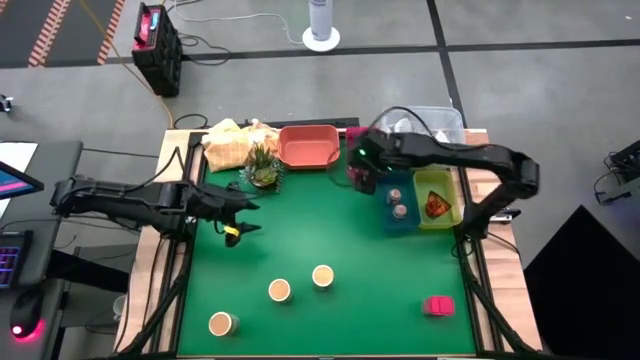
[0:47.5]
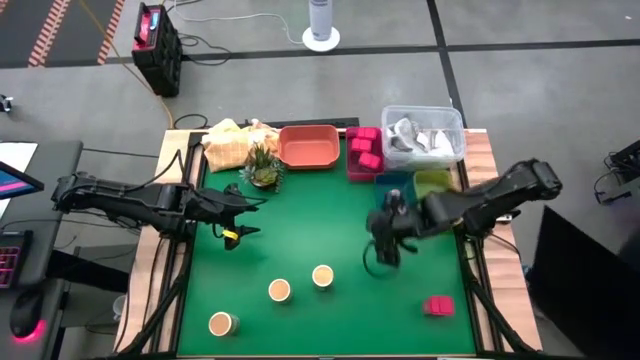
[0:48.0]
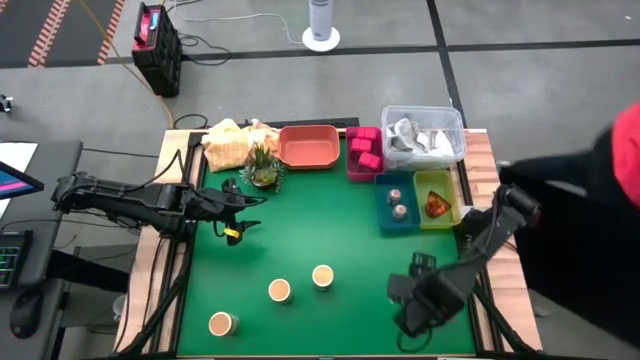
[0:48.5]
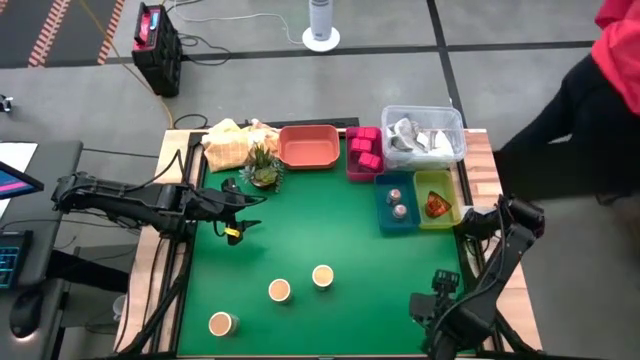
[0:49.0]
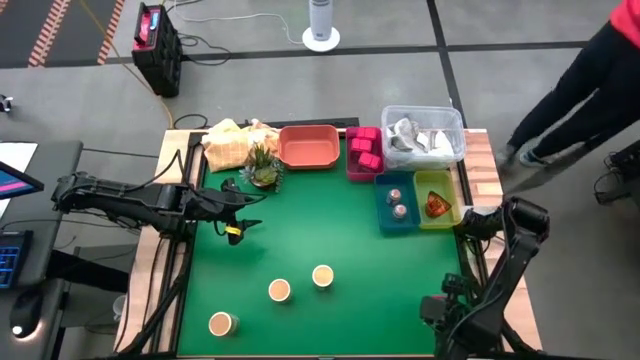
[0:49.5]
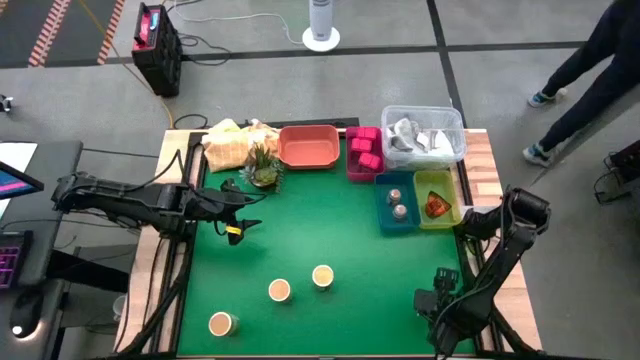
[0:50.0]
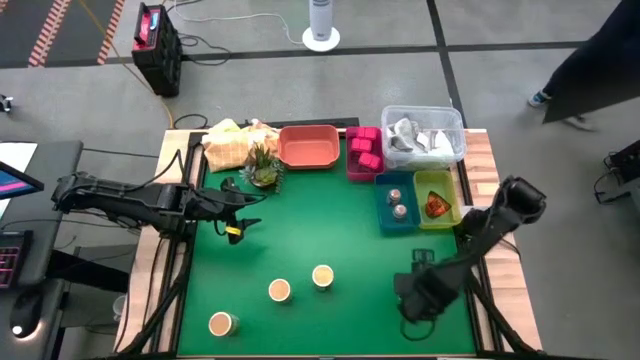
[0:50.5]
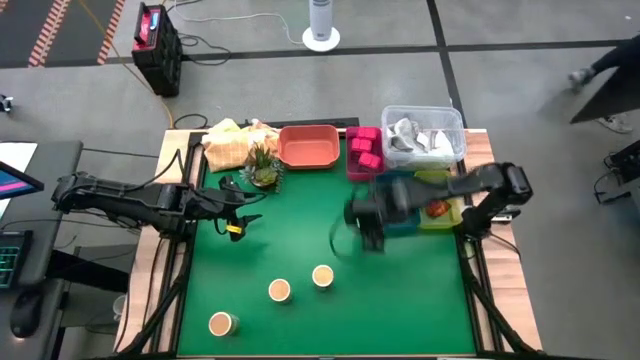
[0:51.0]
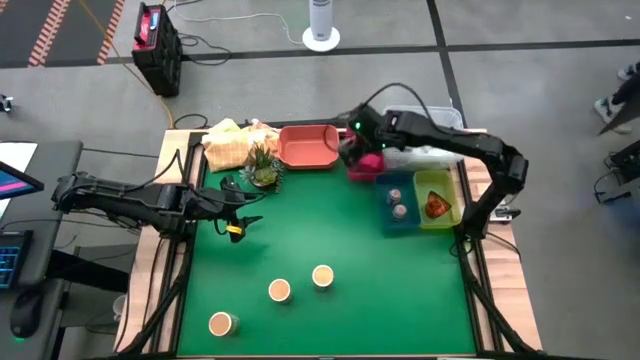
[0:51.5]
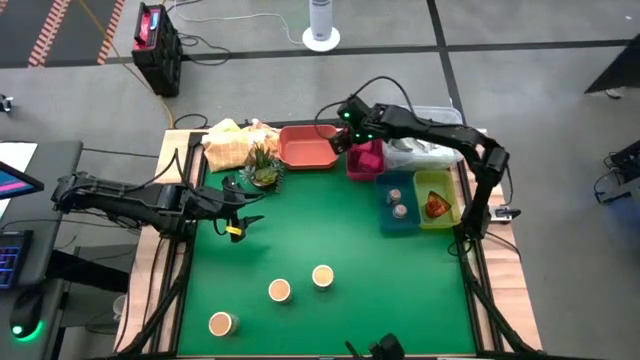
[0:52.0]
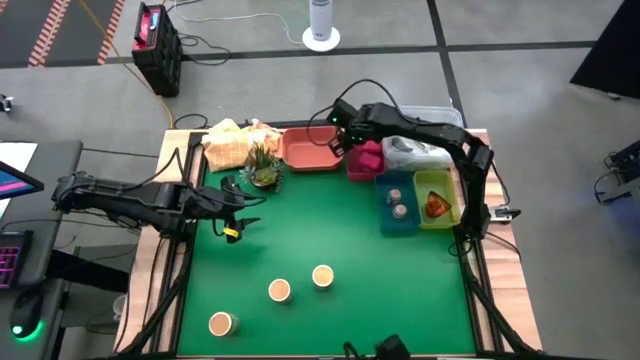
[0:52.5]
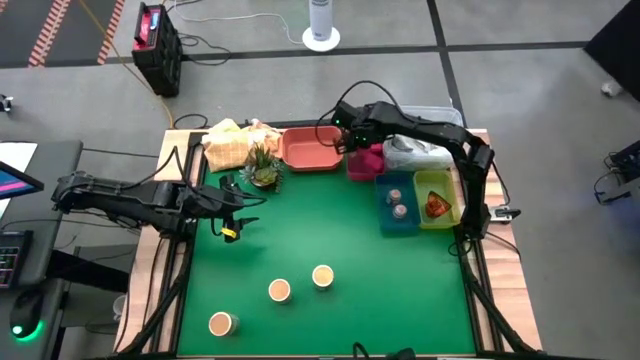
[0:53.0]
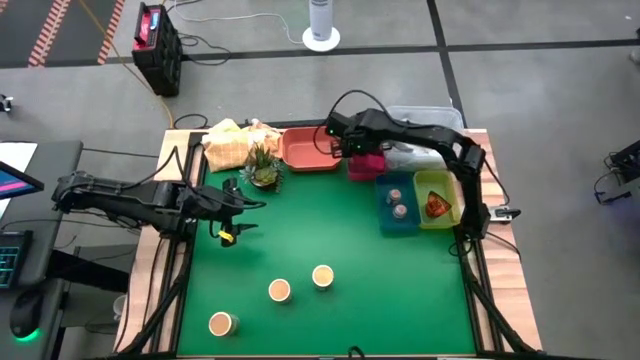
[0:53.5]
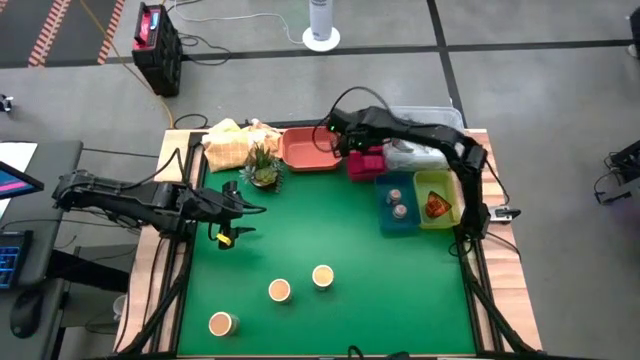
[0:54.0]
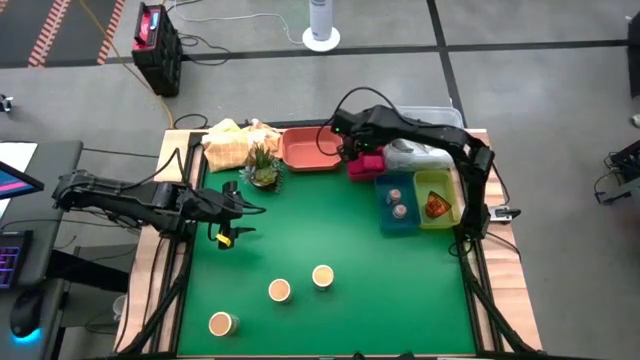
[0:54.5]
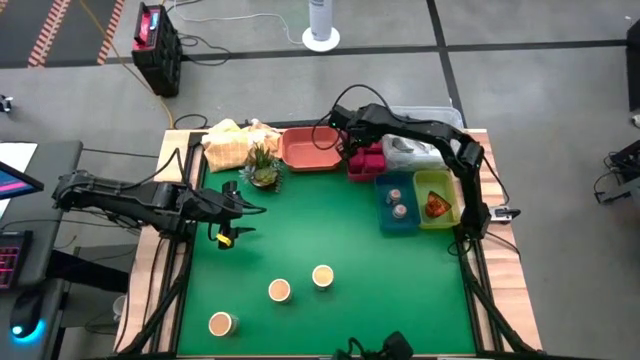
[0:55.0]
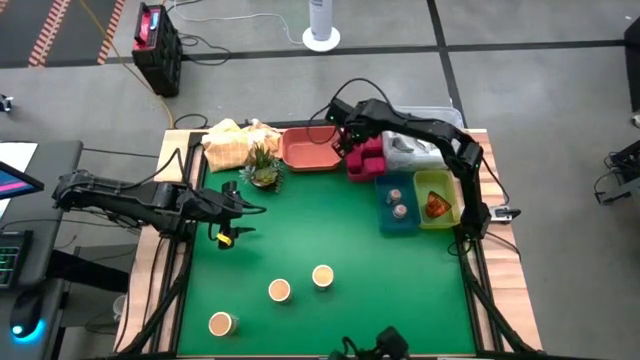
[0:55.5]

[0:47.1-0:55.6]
Task: Sort spices by type
Put the red seasoning can into the pink bin

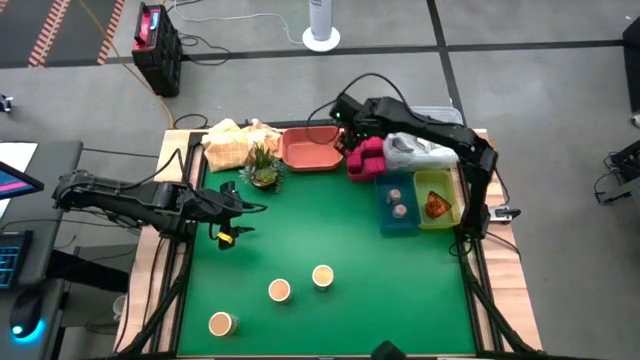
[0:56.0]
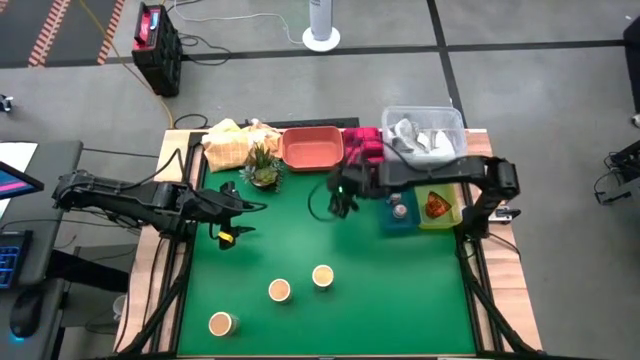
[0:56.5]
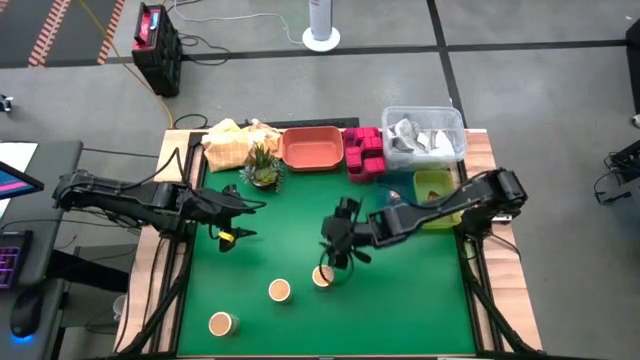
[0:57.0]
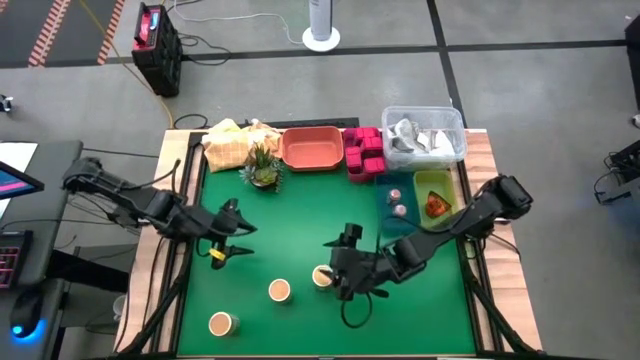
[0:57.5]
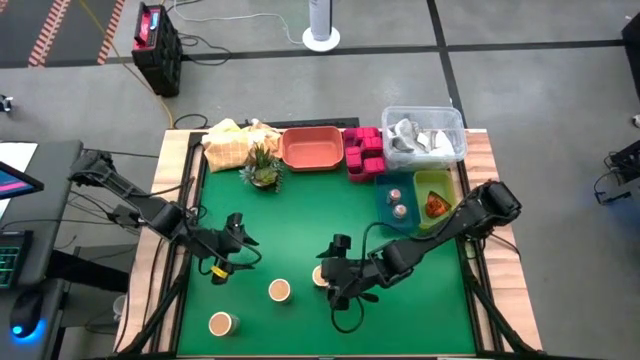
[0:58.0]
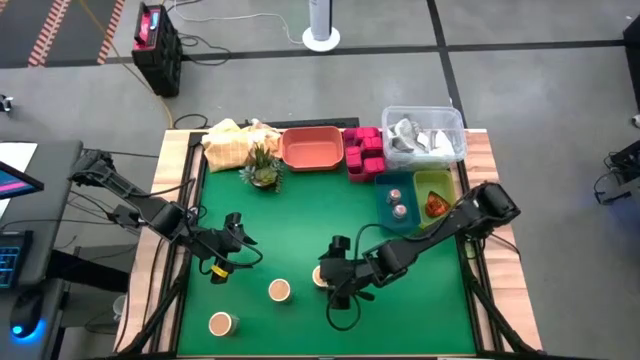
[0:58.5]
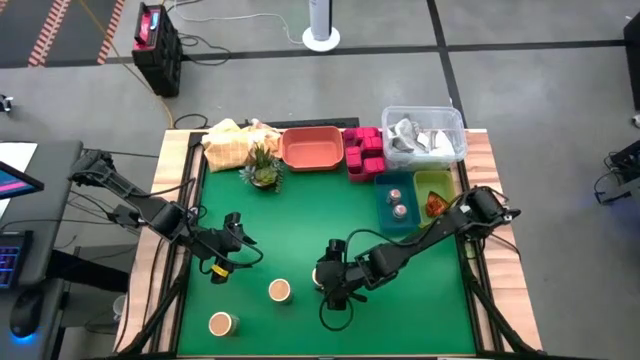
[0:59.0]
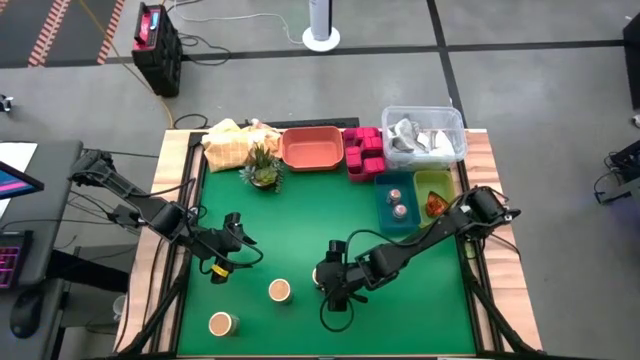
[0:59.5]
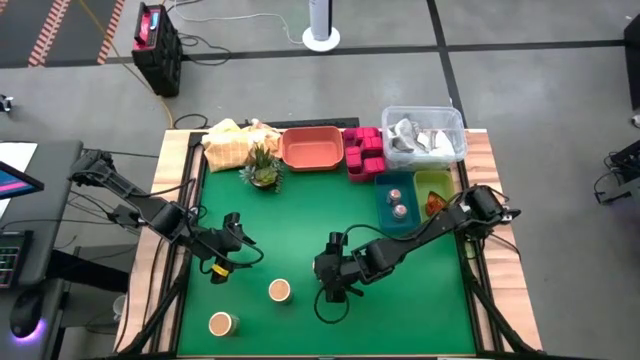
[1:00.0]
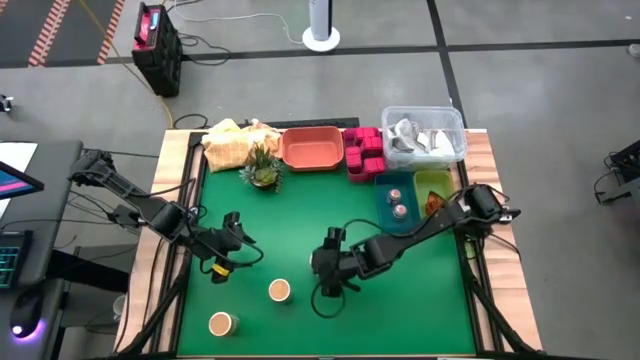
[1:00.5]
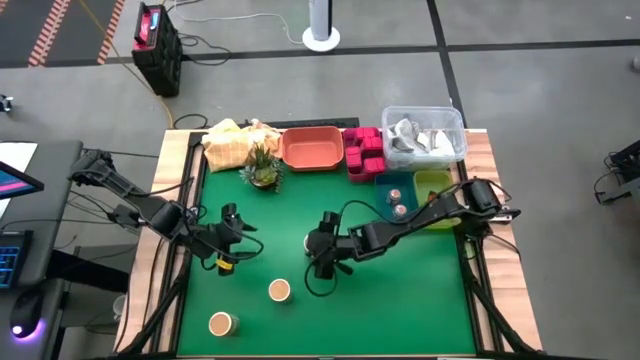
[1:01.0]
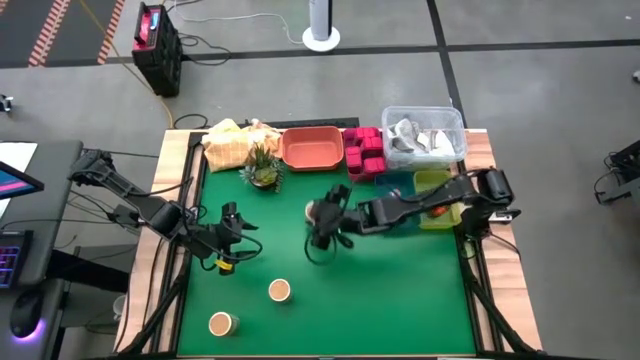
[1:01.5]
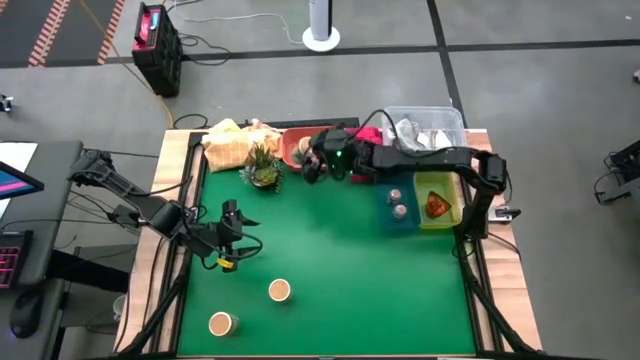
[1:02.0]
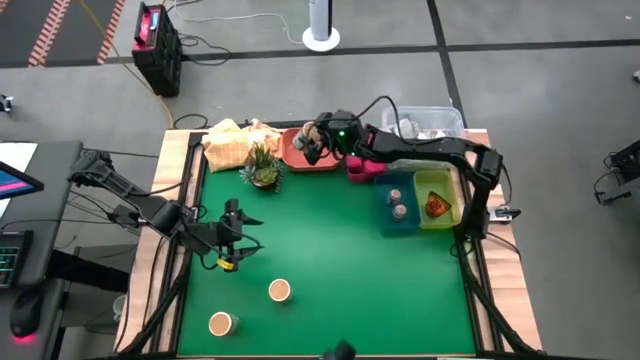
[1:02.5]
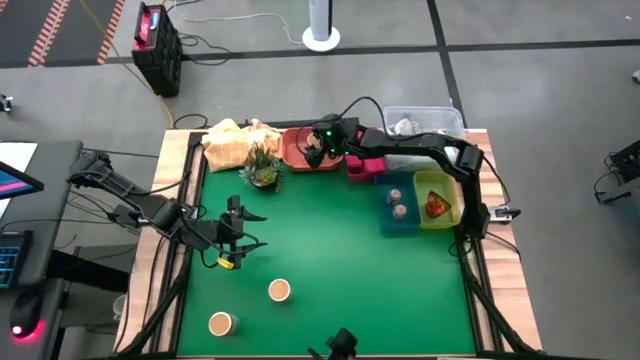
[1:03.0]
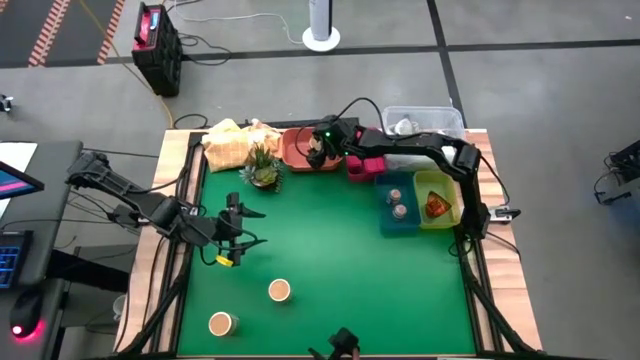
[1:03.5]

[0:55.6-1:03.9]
Put the gold seasoning bottle into the orange bin

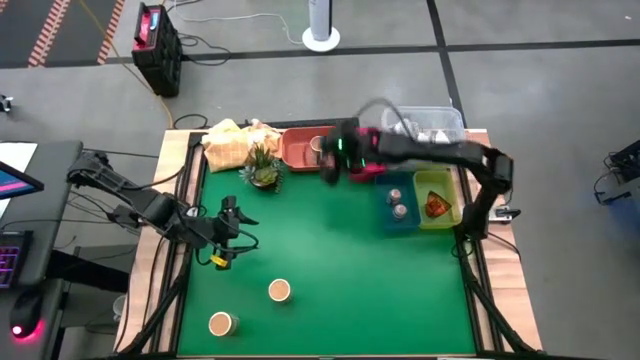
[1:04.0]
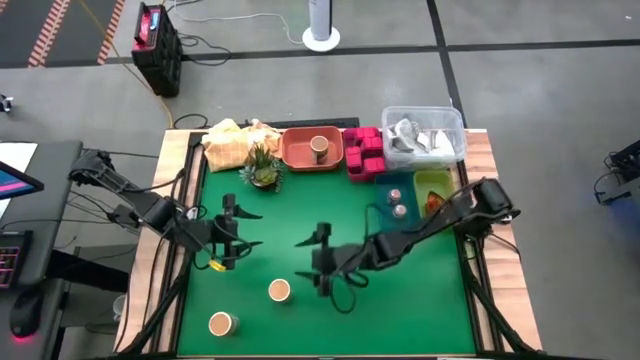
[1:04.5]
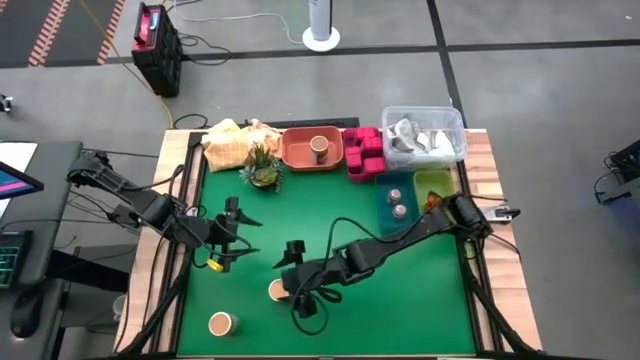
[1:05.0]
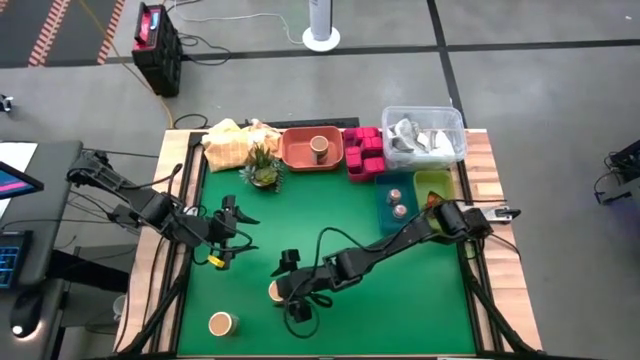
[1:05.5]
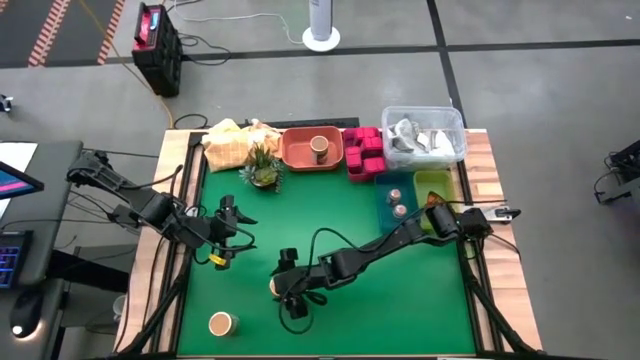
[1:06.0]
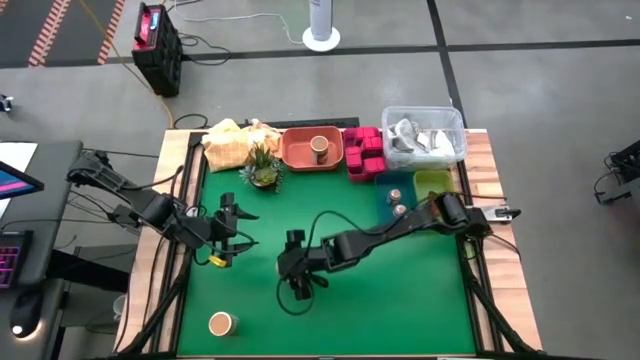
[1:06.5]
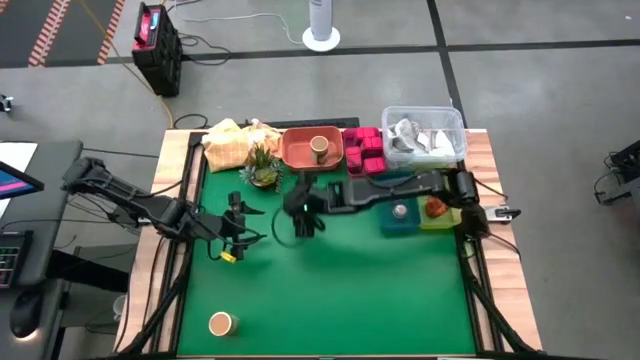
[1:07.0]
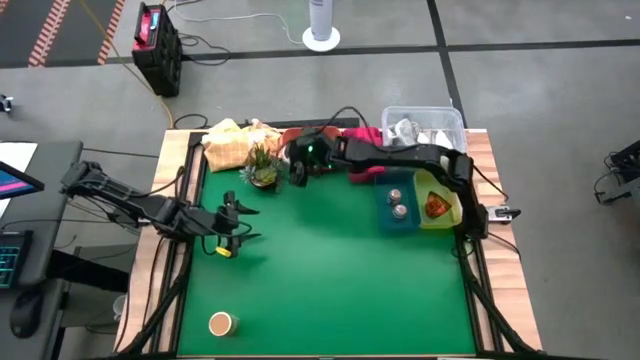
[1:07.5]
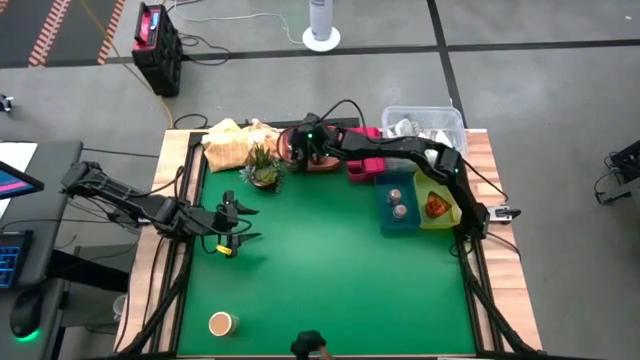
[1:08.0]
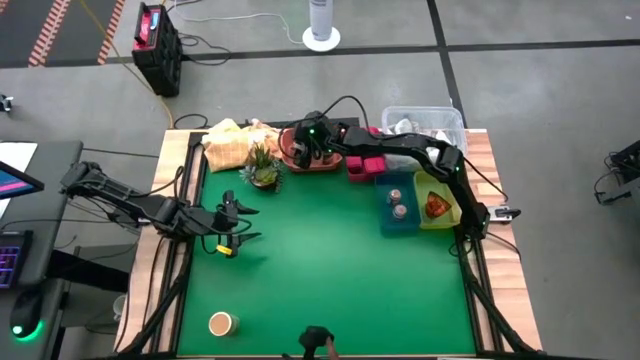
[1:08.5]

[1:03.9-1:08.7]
Put the gold seasoning bottle into the orange bin
